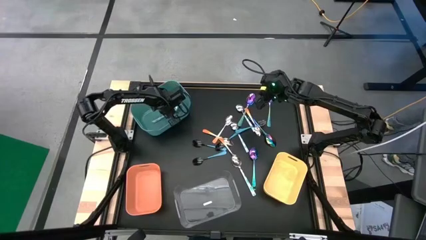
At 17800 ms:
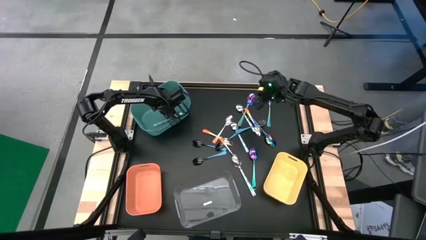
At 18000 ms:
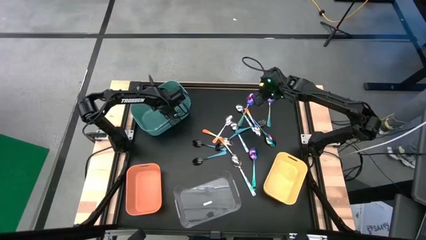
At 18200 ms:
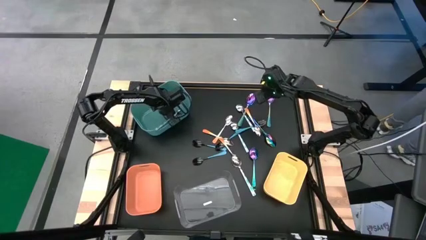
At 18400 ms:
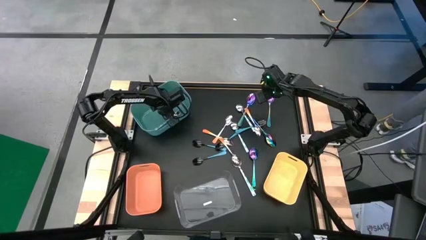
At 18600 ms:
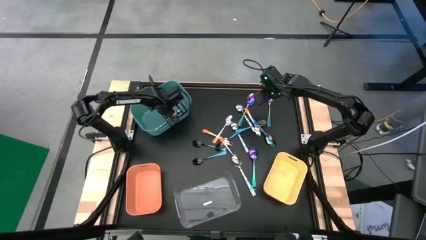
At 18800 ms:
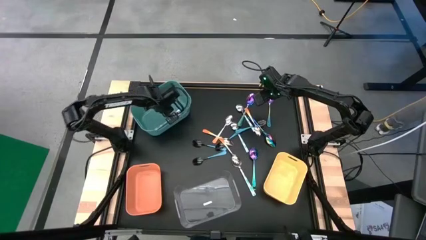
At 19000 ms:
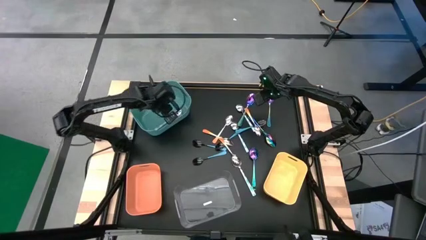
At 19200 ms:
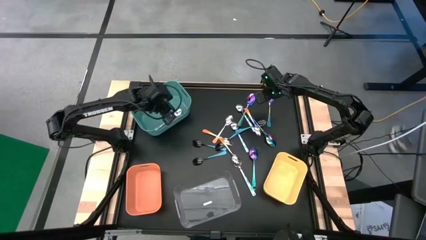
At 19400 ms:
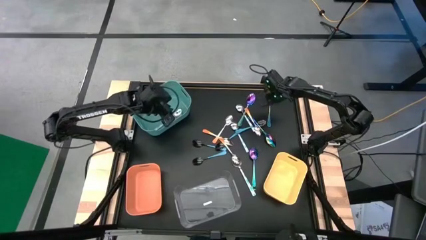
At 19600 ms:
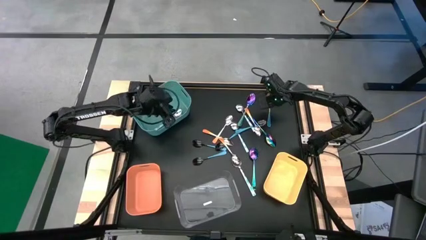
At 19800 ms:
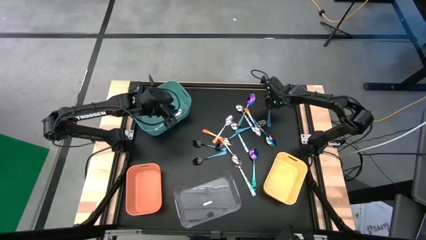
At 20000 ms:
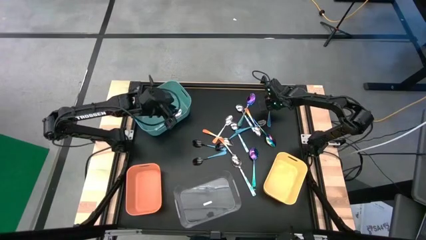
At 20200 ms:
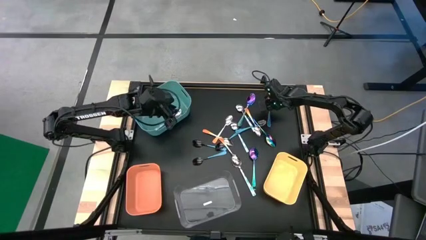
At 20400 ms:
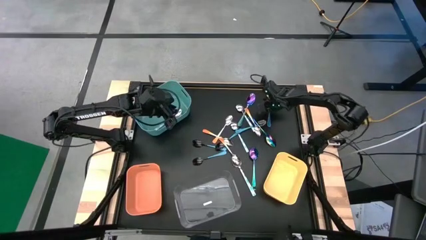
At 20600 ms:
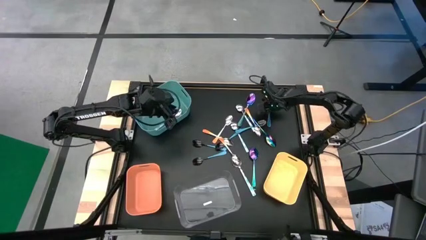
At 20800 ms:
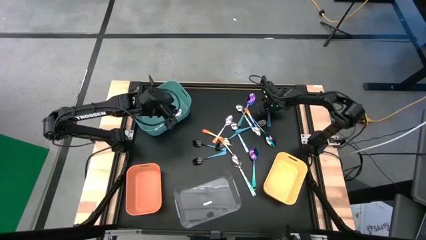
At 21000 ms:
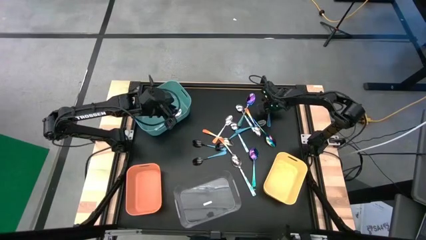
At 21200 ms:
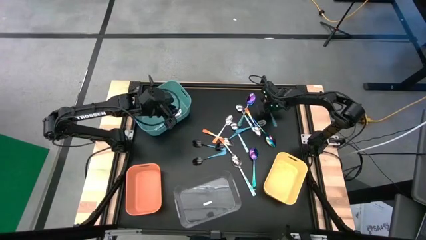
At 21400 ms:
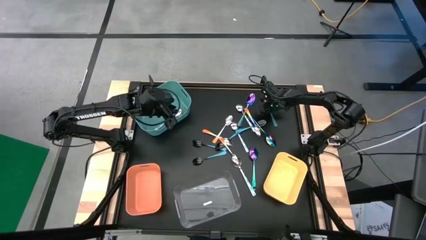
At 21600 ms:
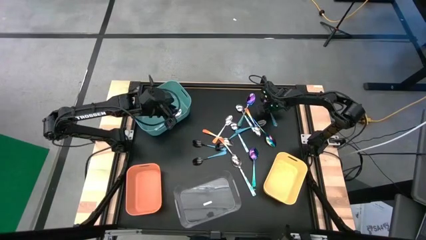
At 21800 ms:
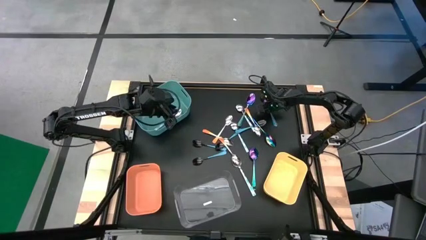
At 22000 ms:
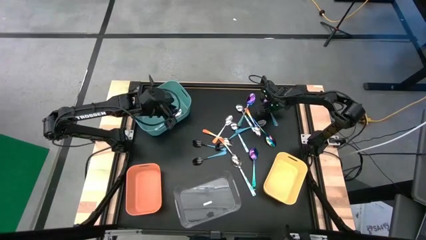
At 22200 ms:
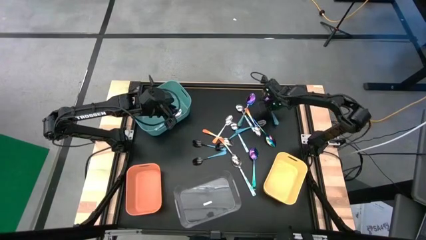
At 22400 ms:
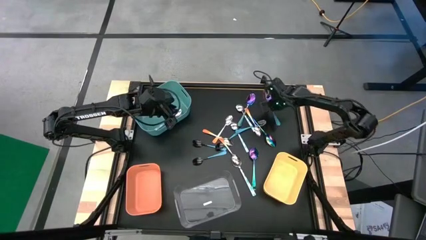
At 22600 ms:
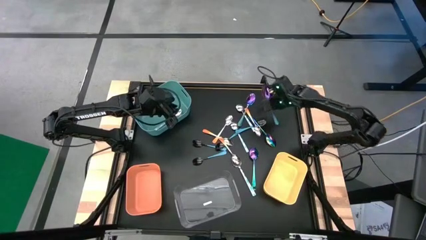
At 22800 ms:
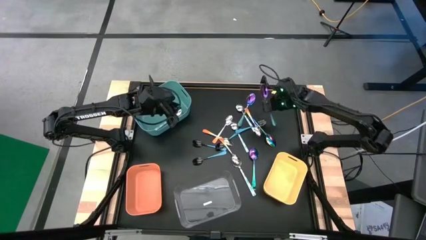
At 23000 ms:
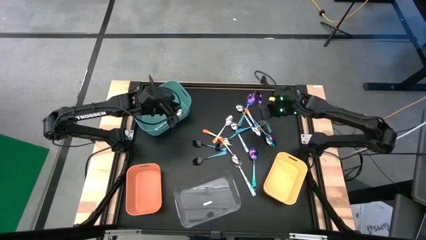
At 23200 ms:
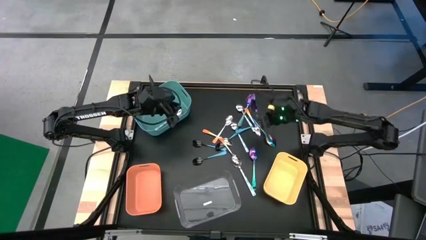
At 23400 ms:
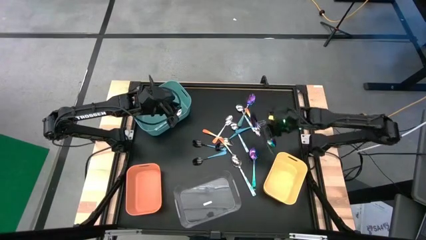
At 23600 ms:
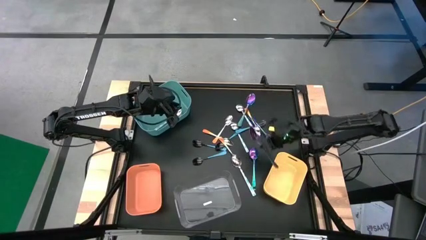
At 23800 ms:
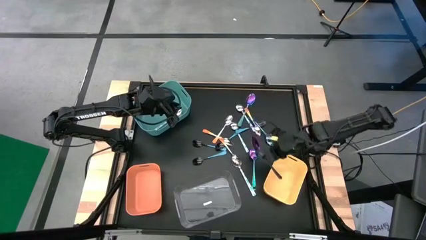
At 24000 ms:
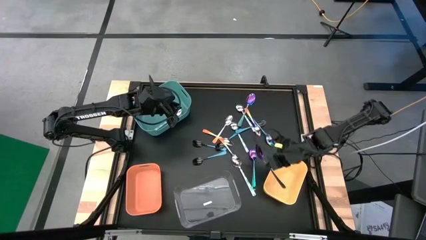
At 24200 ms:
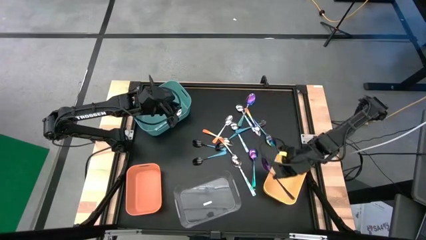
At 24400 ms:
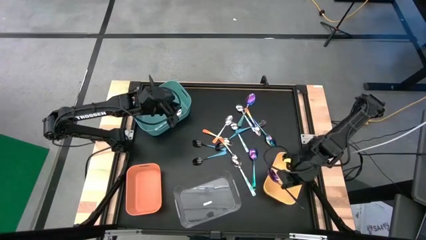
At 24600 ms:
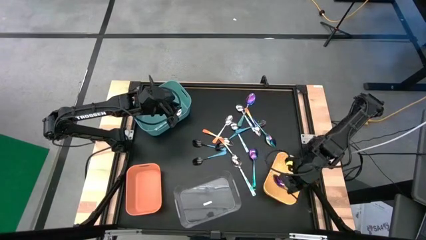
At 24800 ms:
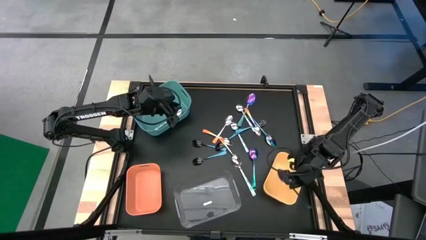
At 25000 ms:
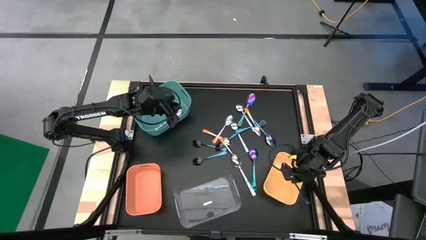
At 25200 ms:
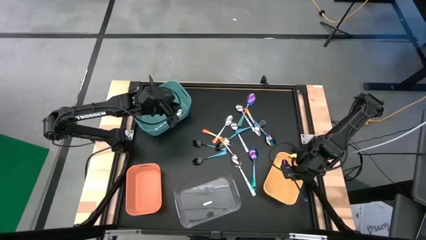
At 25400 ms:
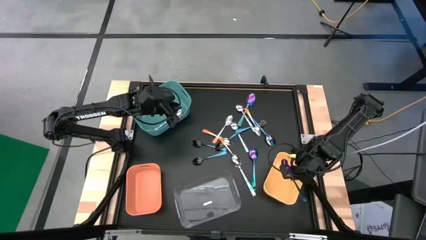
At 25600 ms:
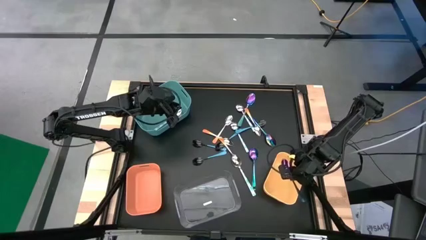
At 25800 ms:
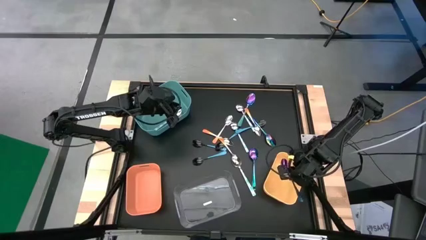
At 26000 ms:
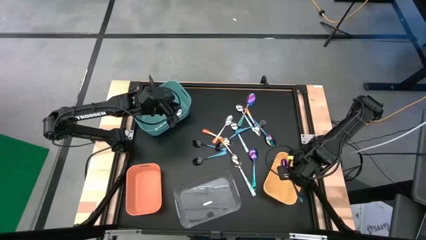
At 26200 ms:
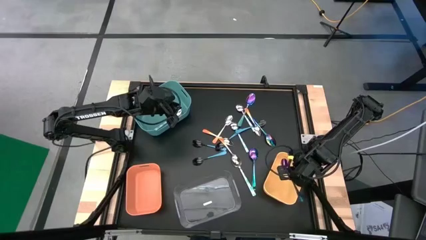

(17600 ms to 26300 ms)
Task: Sort silverware by color (type)
Put the purple spoon into the yellow bin

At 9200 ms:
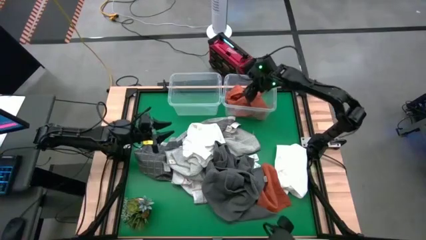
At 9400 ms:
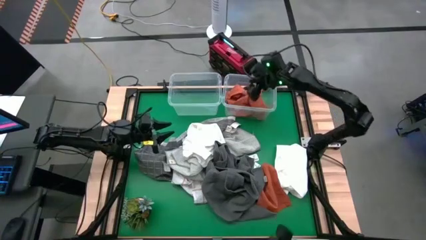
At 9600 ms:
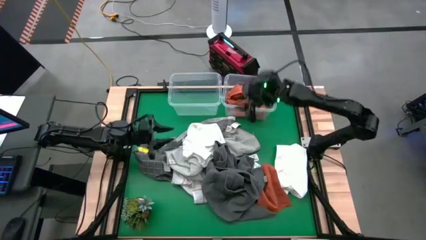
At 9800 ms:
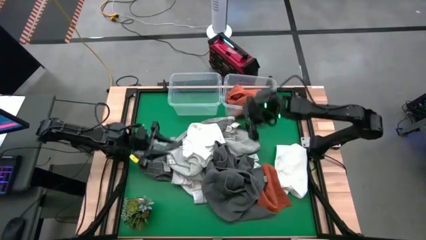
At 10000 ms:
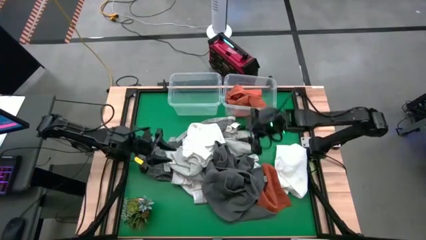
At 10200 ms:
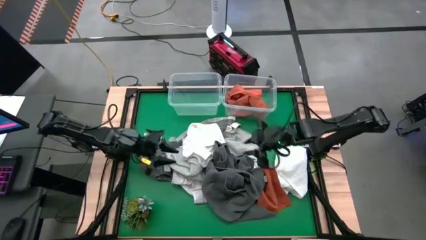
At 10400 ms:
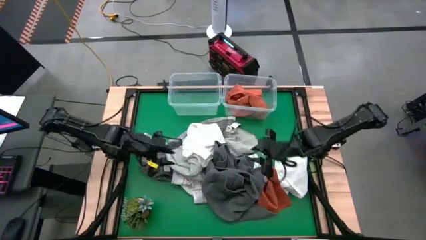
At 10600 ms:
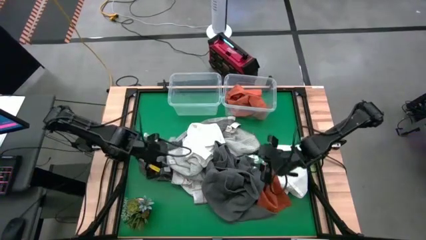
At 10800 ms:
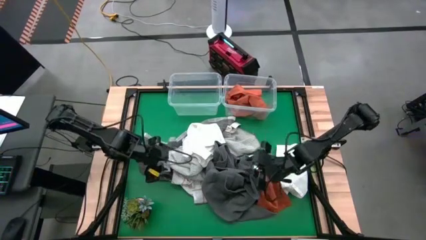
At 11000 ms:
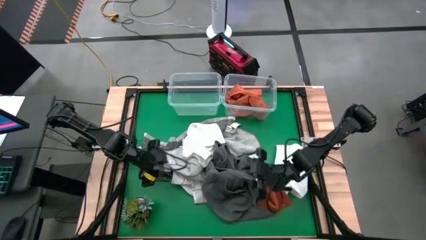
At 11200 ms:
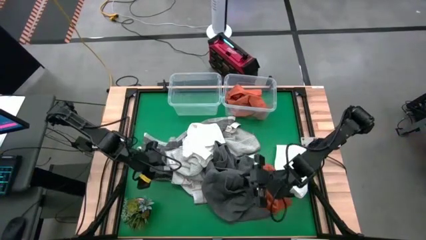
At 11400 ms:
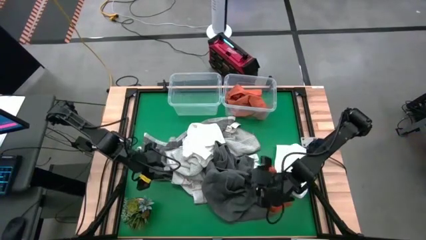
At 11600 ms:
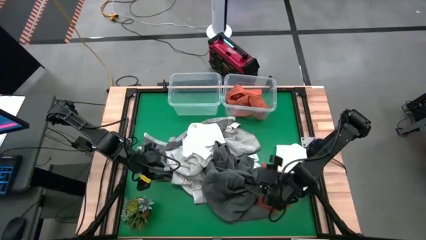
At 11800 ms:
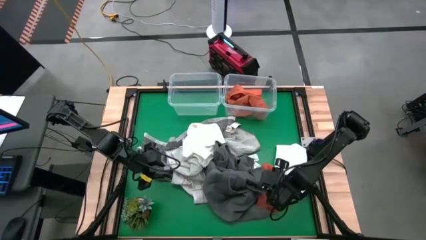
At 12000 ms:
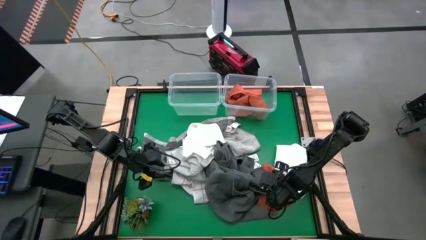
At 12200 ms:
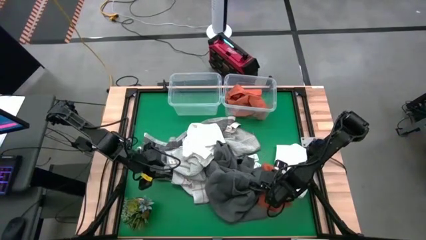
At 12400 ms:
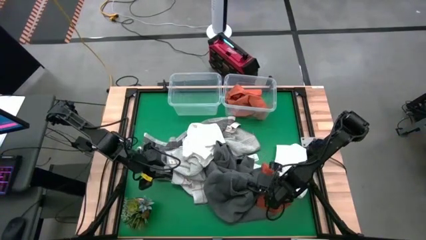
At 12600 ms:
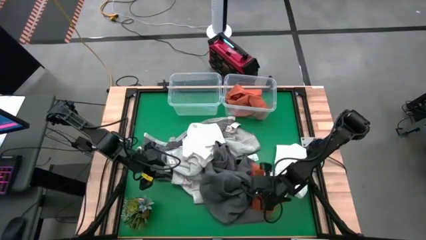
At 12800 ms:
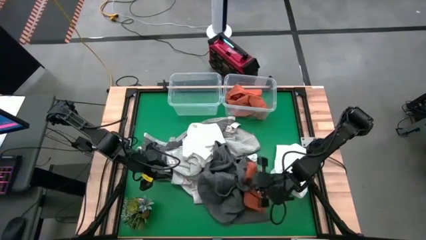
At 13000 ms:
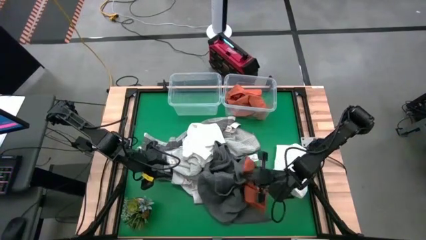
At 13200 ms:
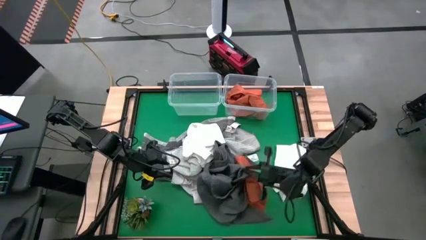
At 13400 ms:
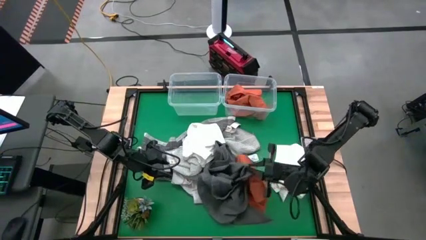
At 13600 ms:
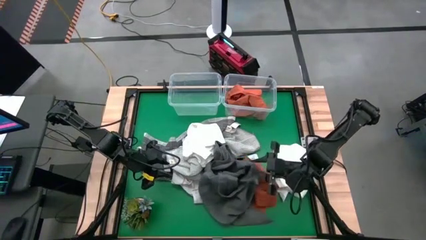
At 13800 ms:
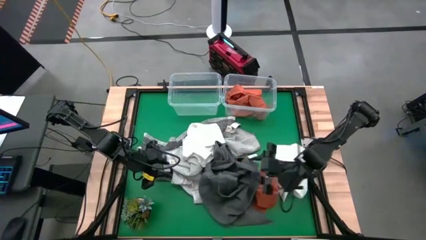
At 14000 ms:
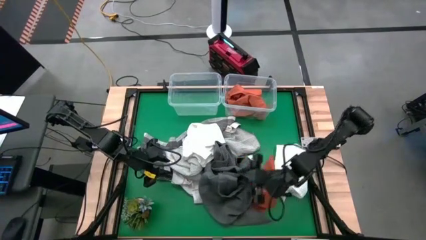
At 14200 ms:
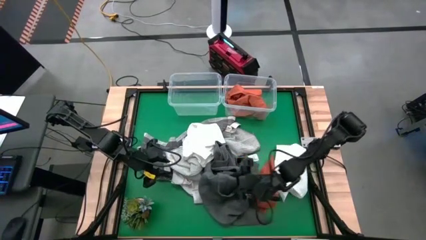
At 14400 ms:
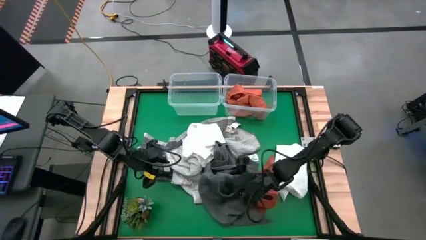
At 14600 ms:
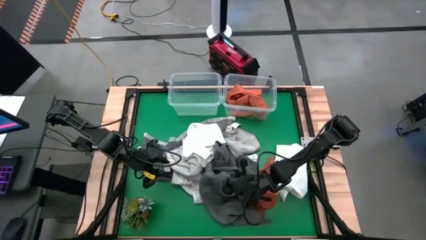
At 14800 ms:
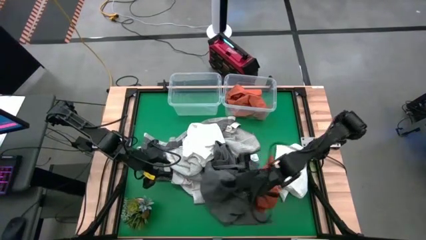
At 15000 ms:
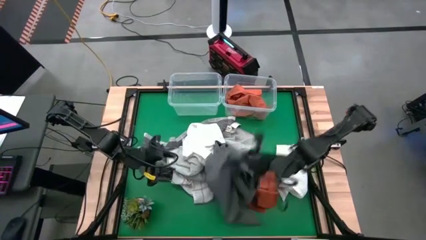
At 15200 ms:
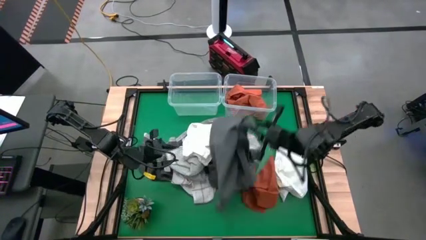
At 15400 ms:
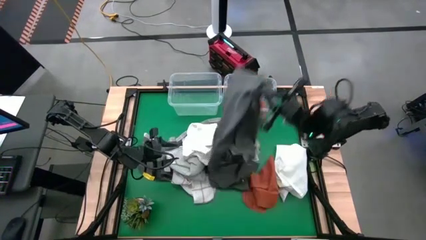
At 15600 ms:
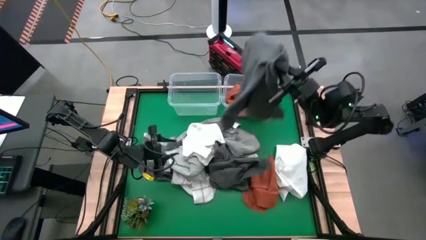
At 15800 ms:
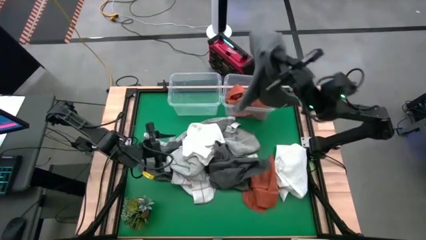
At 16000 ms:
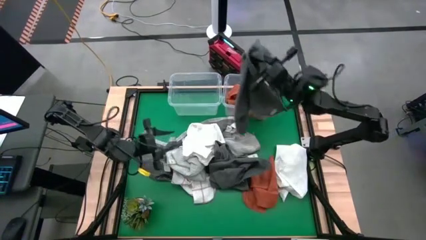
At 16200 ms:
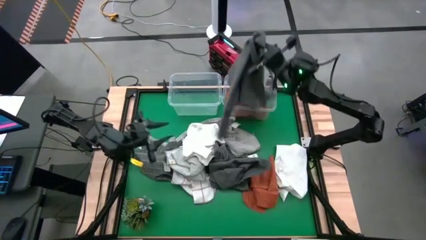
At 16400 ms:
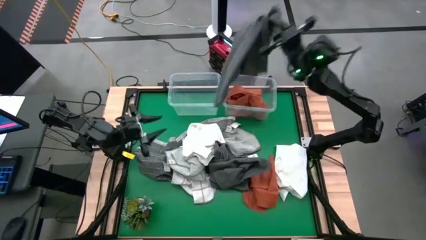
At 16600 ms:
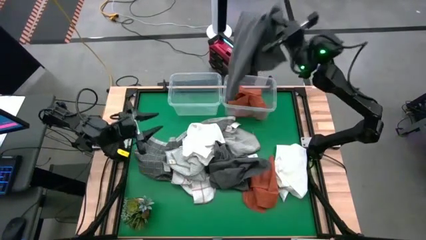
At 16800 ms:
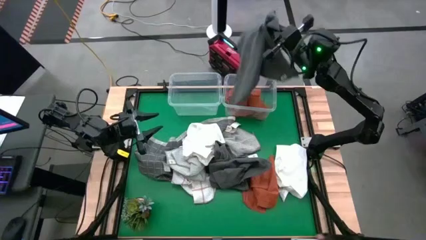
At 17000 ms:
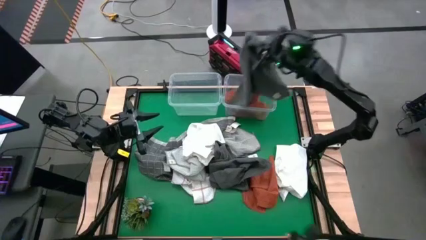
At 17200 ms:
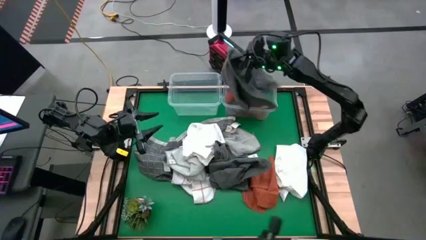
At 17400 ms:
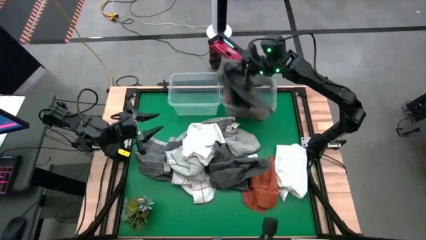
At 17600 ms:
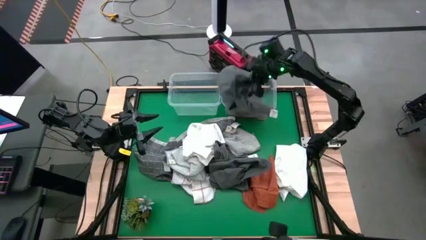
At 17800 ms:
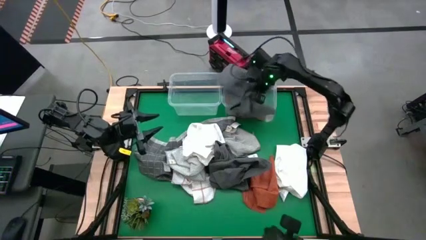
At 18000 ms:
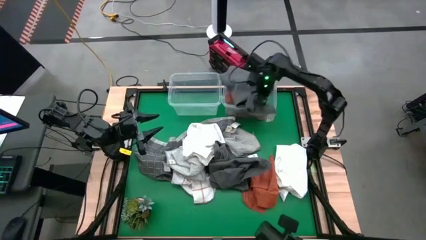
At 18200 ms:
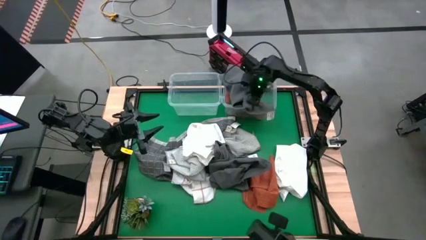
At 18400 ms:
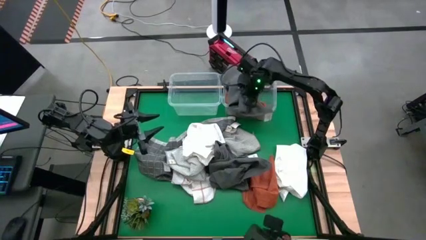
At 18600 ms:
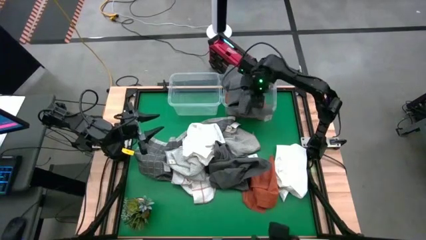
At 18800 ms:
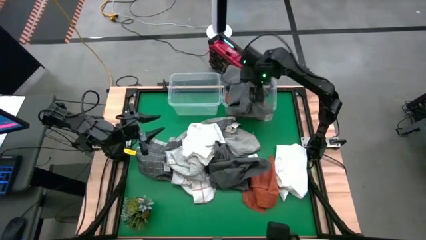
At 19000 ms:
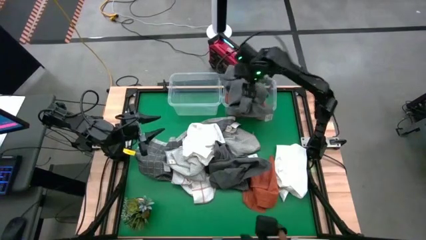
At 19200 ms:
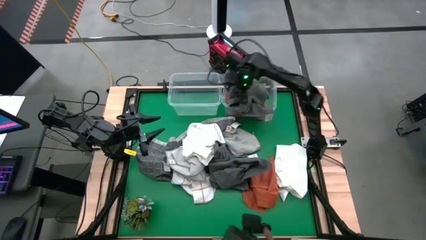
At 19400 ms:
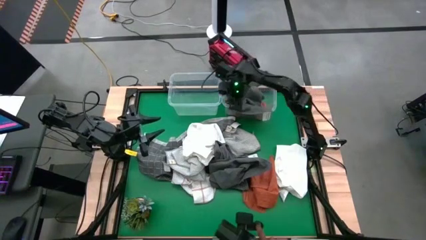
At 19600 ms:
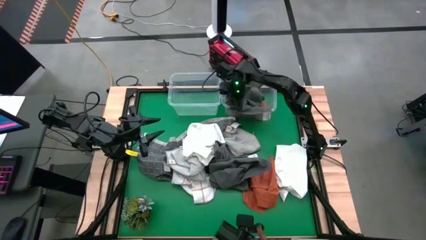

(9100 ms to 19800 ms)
Task: Sort towels by color in basket
Put the black towel into the right transparent bin
